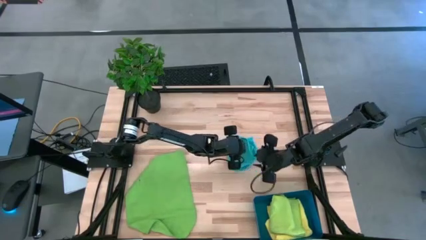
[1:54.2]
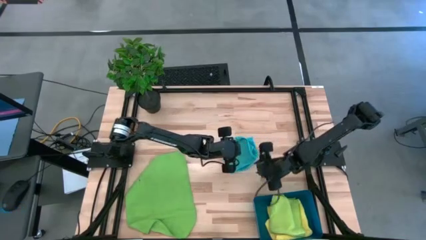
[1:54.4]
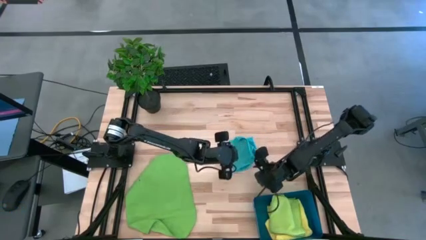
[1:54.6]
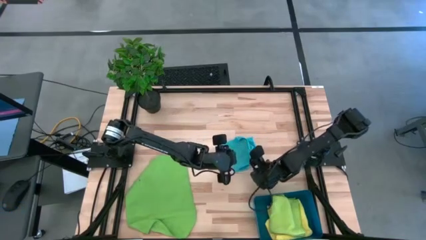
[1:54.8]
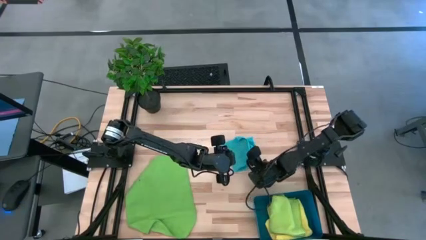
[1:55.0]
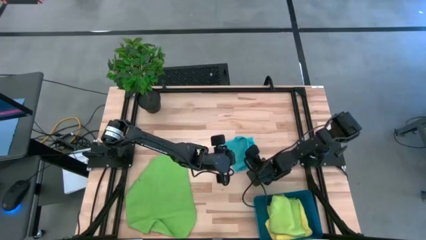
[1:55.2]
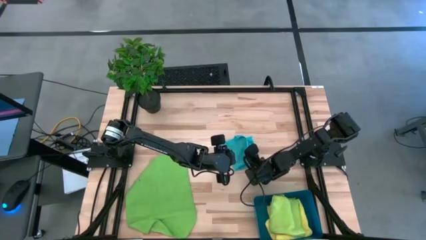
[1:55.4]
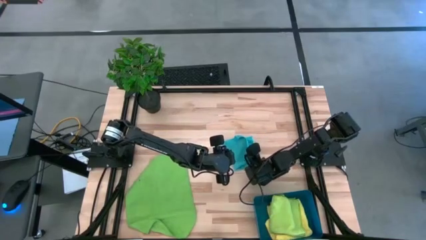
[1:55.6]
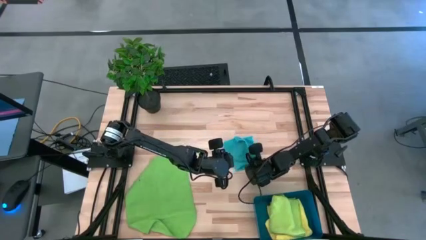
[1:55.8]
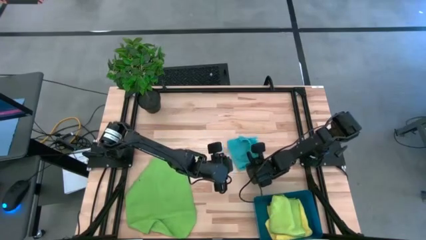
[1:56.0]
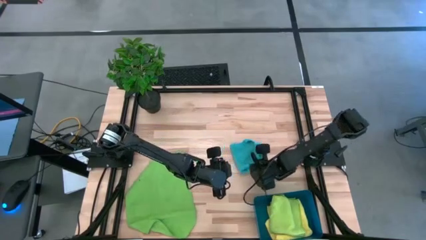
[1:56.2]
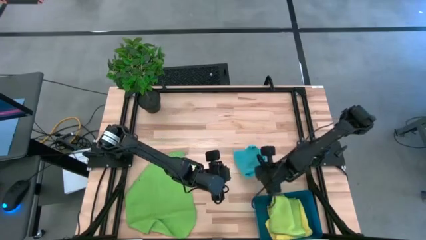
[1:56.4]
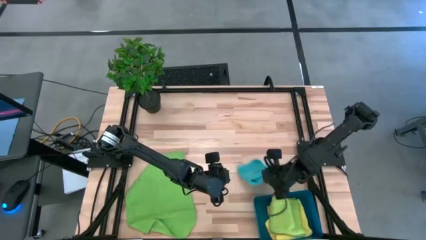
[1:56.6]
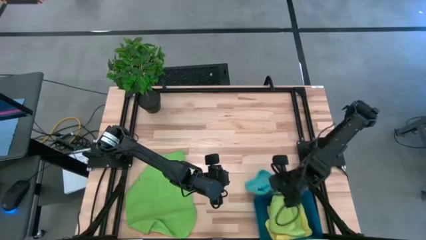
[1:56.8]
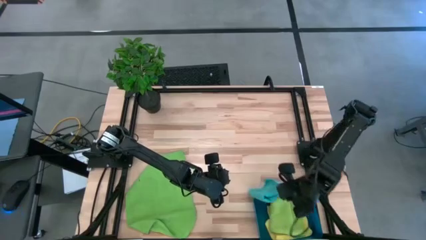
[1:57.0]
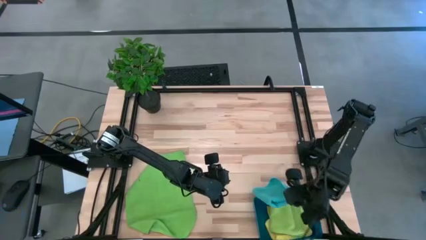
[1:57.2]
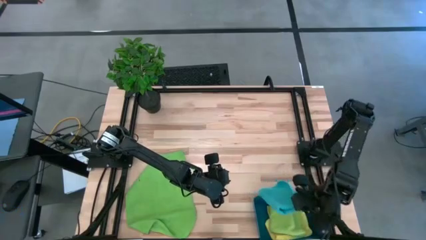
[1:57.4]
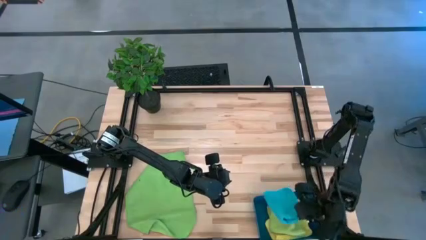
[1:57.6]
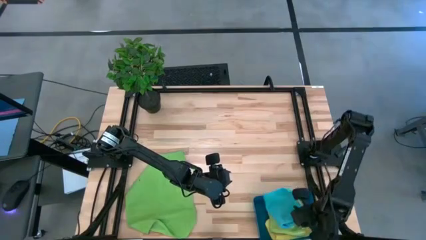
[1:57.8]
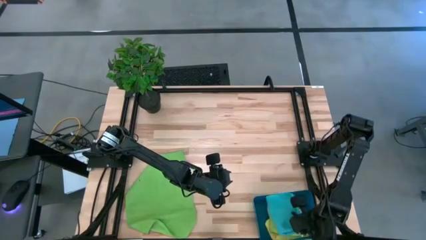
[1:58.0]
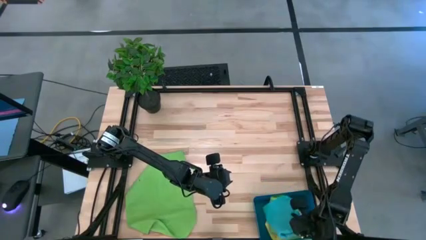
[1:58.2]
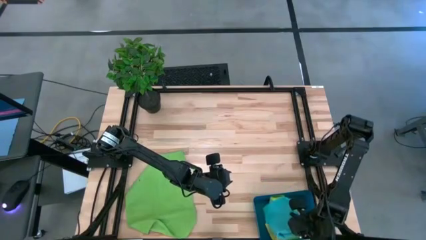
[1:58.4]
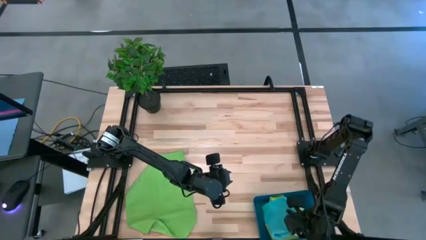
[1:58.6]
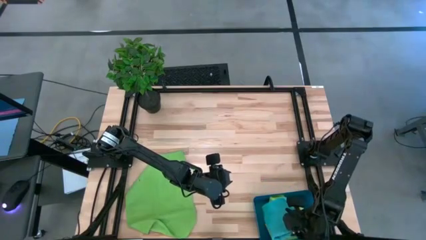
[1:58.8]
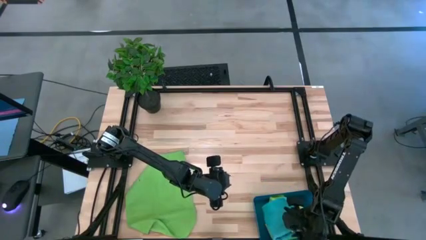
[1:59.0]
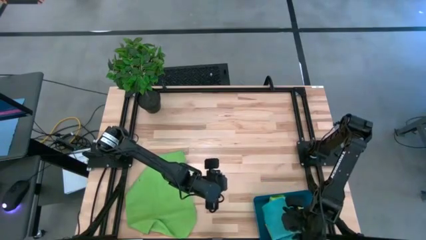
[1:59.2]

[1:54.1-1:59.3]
Task: Fold microfiber towels
Put the folded blue towel into the bin

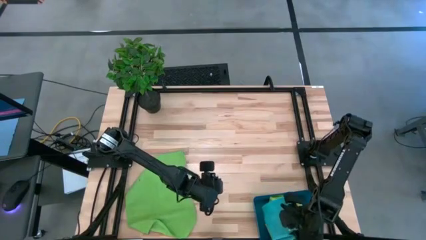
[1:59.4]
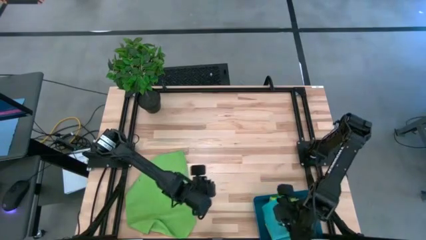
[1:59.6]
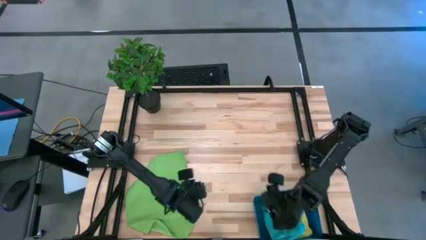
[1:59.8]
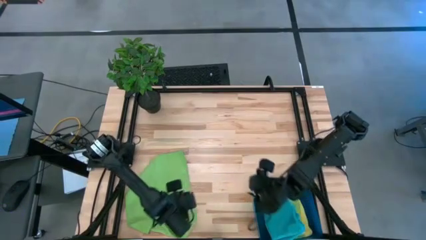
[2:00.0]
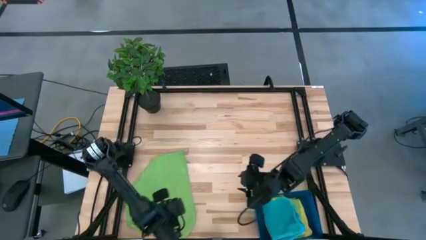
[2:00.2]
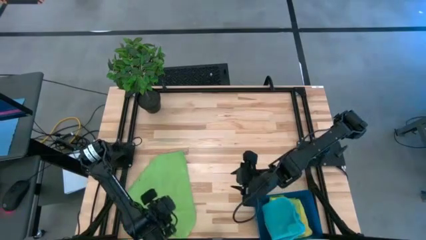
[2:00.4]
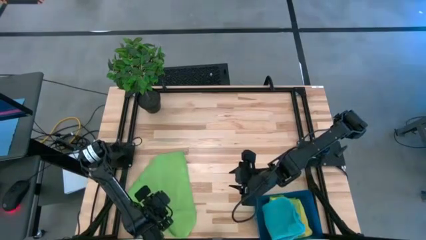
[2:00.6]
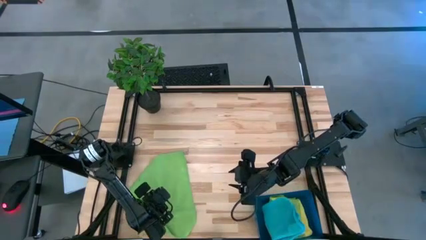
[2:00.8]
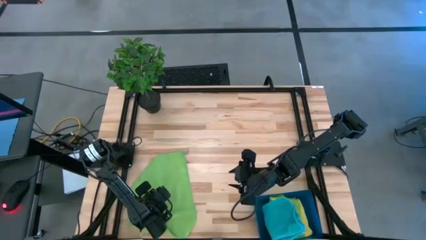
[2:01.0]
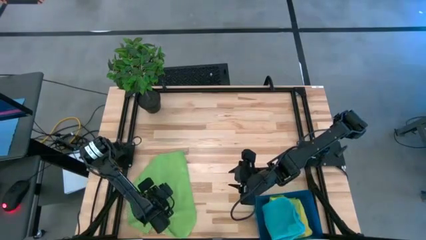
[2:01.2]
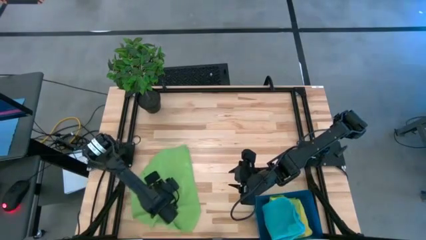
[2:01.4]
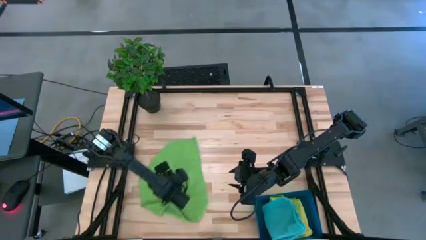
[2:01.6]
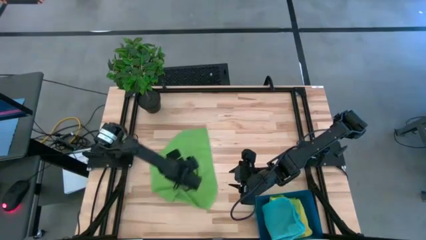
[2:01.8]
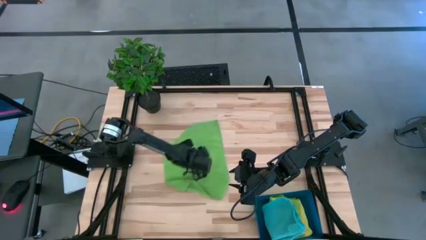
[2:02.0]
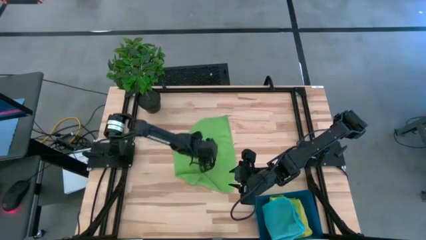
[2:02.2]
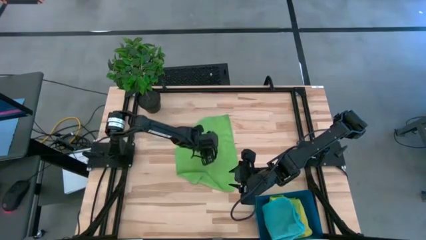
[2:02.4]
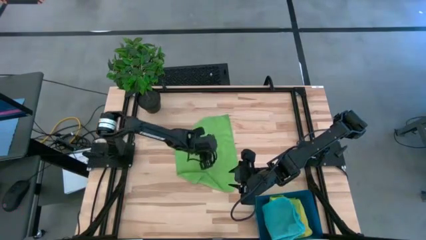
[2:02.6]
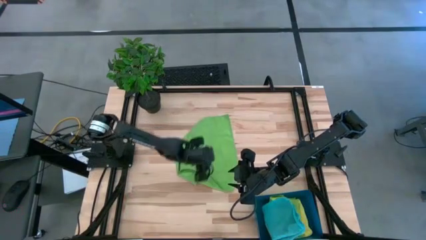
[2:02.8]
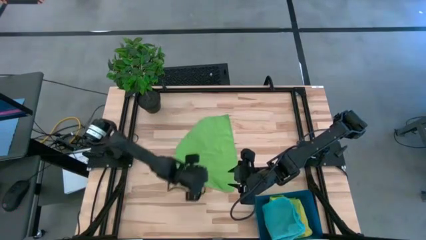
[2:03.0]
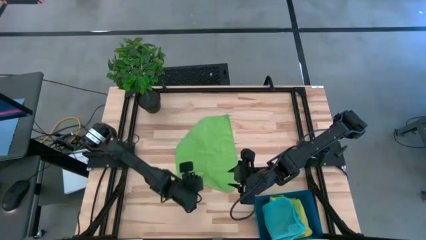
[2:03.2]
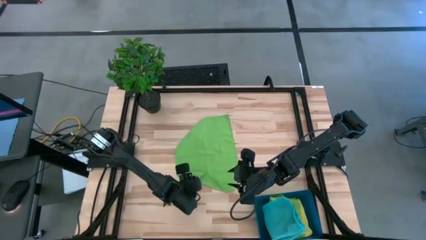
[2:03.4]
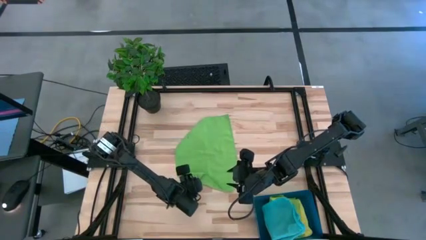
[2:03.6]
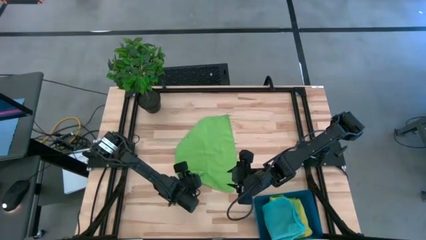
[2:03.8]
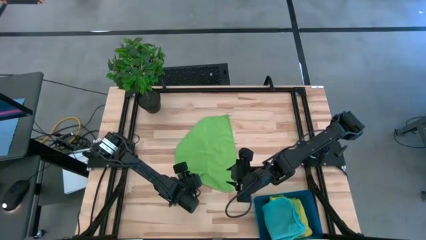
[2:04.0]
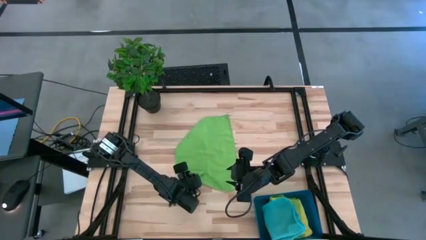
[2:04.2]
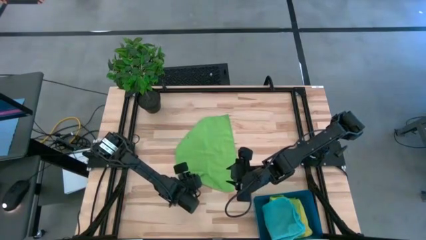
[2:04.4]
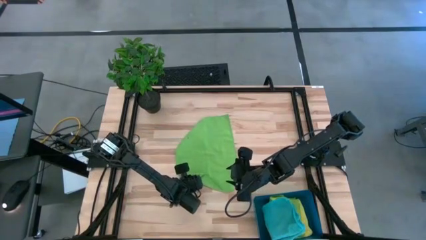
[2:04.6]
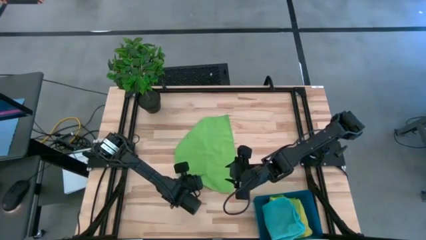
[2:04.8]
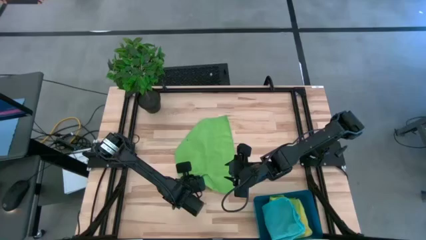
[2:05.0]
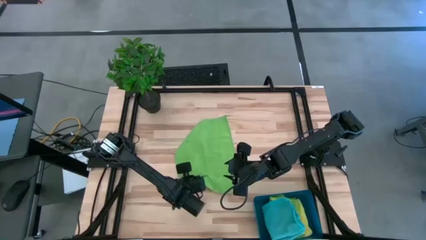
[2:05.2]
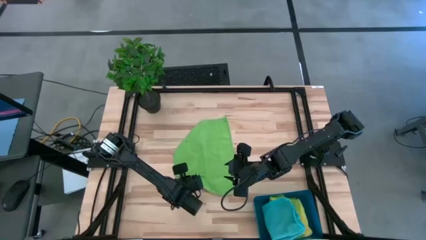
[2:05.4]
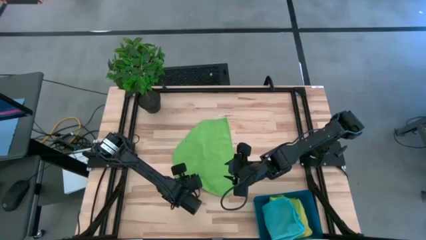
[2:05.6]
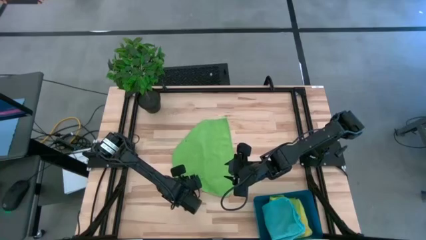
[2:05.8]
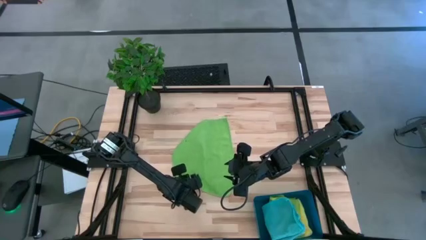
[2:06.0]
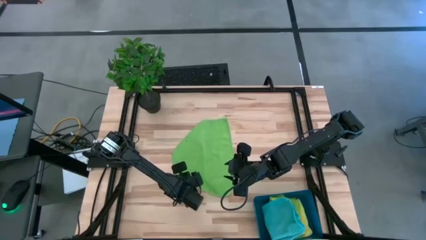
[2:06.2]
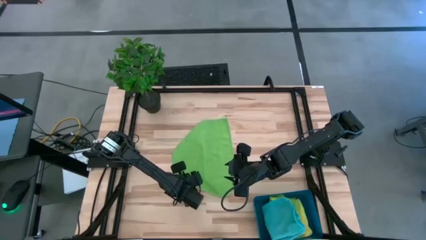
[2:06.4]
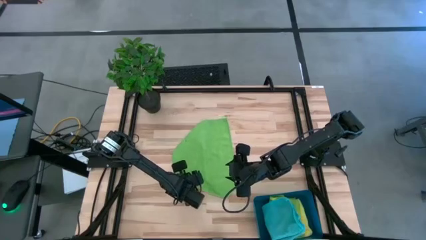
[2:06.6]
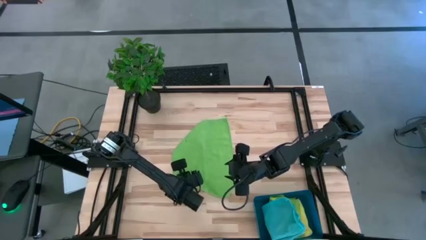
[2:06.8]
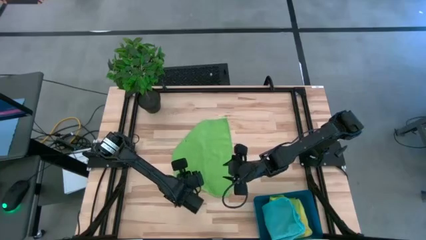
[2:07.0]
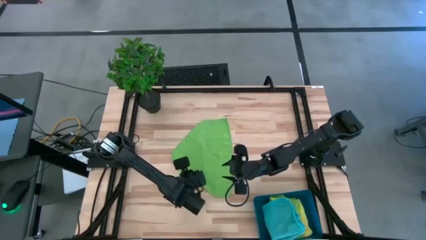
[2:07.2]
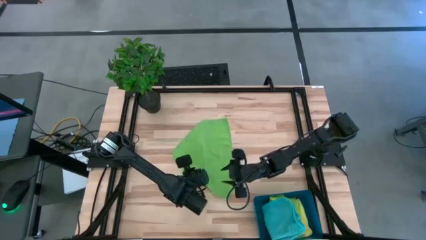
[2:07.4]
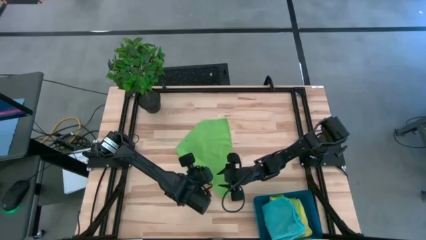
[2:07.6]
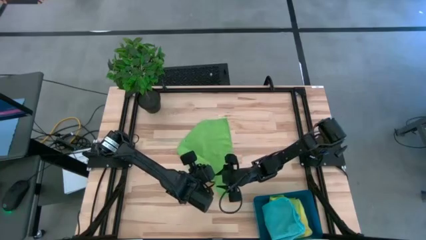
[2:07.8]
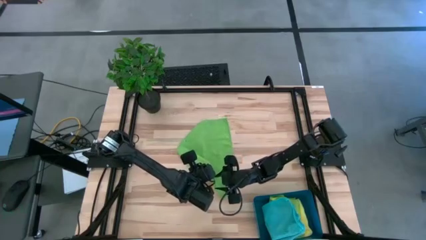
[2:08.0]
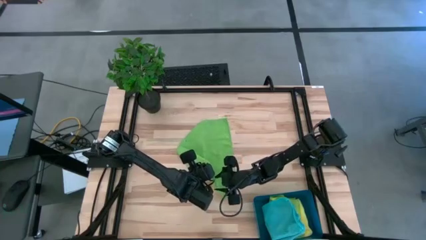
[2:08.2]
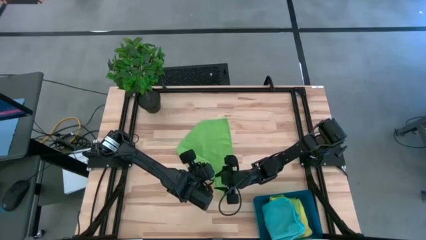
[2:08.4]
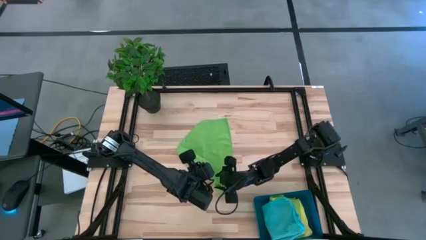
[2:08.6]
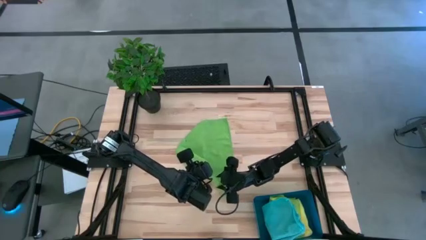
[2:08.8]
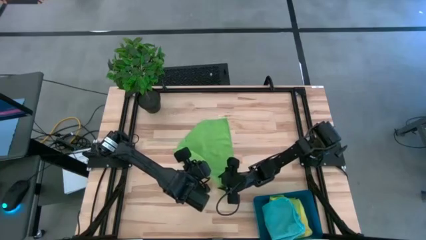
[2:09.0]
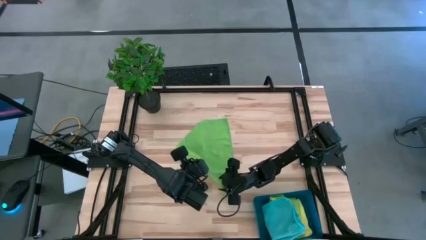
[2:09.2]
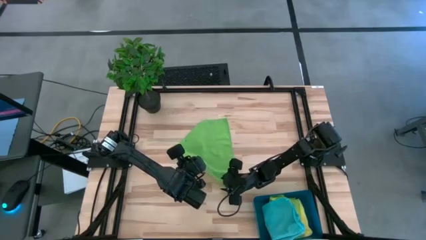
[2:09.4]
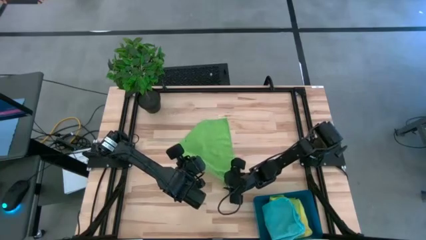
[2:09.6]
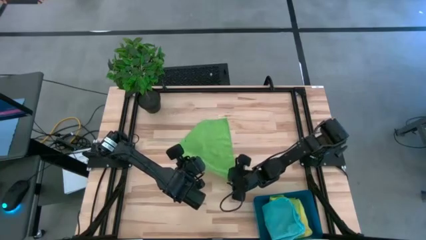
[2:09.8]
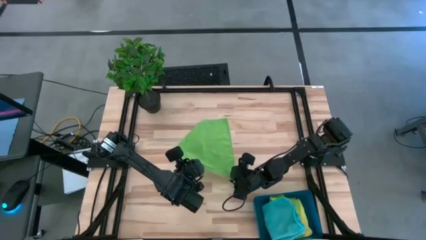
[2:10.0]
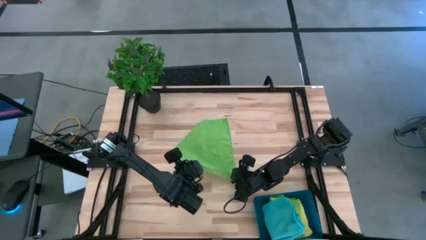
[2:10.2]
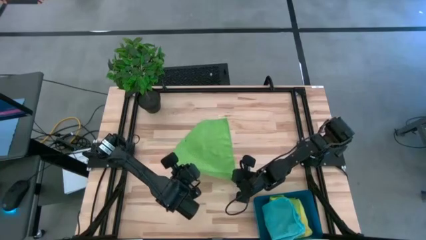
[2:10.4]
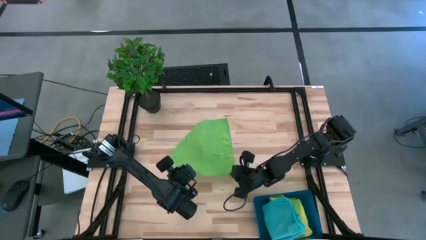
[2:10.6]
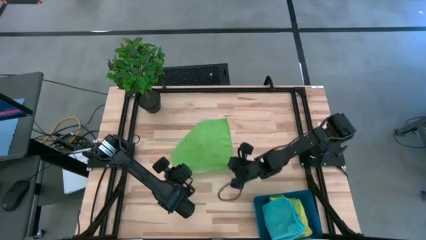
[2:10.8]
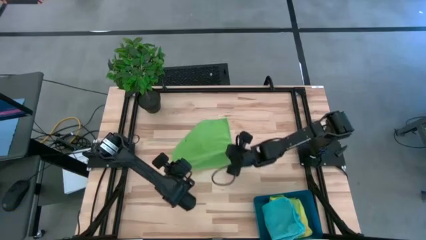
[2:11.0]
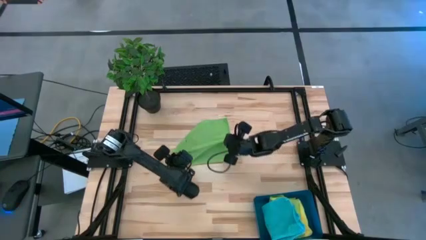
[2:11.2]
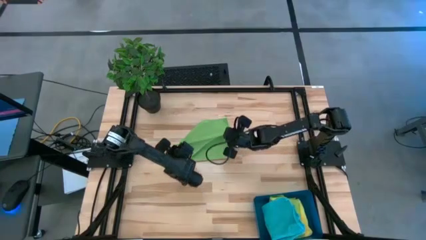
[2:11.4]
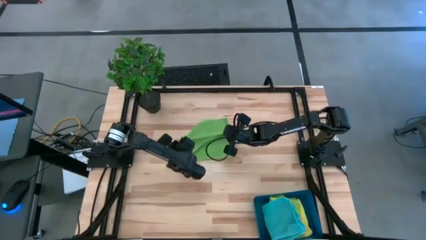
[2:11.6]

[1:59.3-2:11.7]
Fold the green towel
